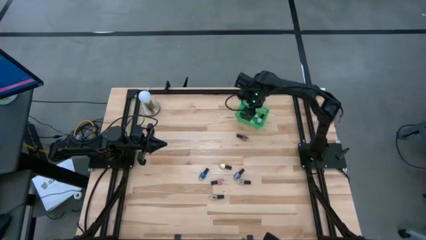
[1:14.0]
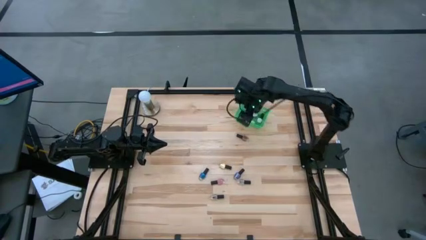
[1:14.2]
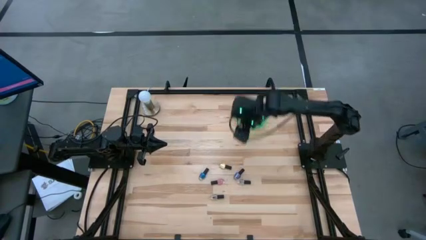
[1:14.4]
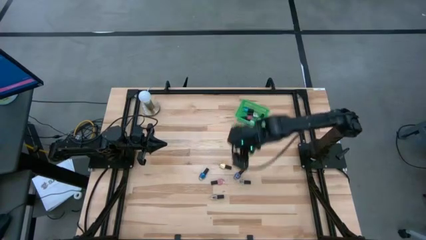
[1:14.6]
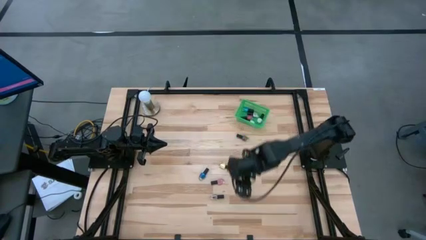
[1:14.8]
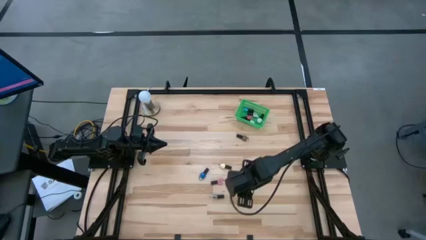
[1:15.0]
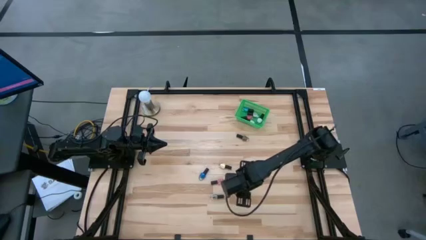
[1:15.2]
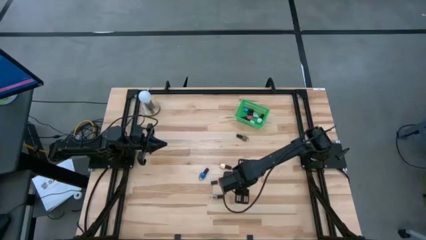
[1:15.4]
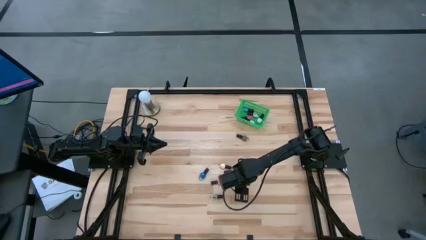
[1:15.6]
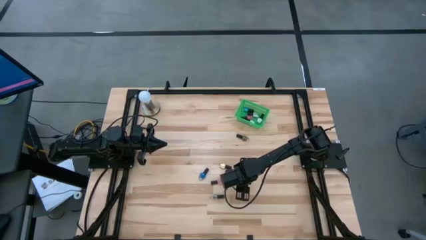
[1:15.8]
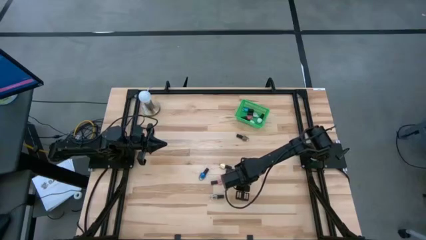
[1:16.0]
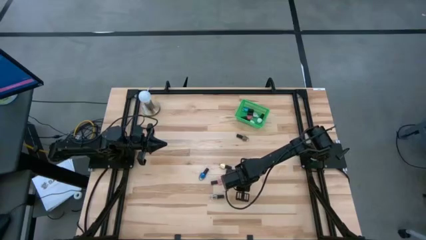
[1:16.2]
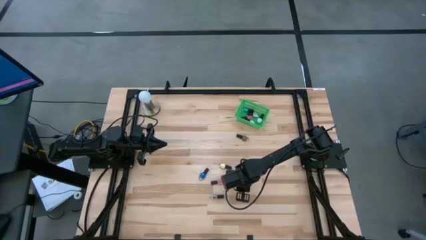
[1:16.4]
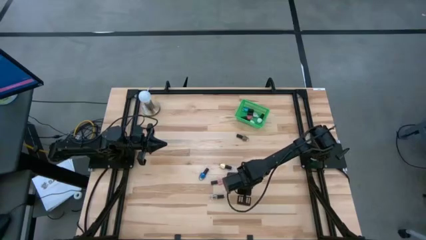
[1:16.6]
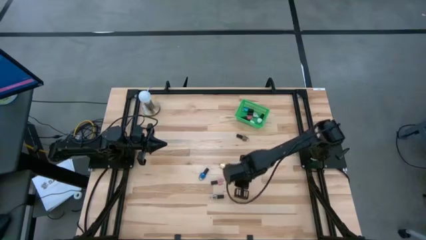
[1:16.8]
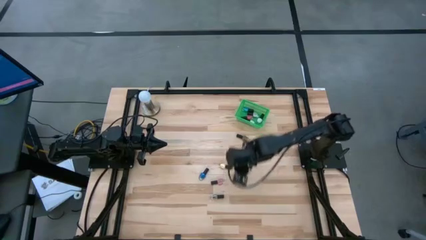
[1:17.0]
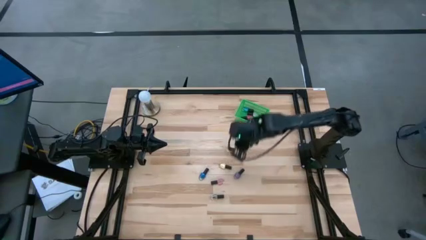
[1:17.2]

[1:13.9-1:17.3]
Task: Pick & Place Nail Polish
Put the right transparent nail polish into the green bin

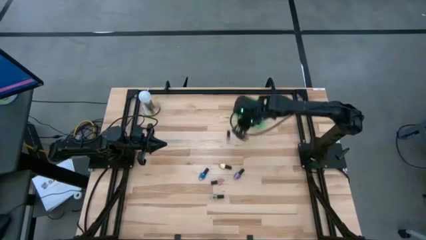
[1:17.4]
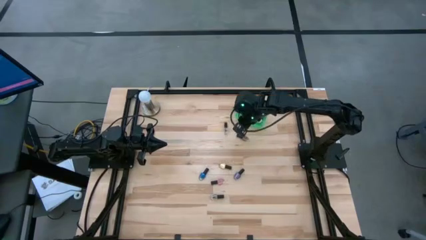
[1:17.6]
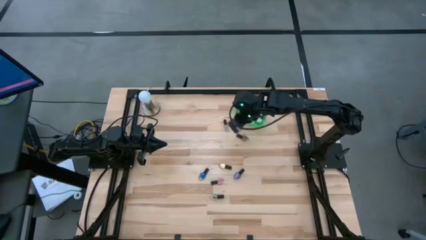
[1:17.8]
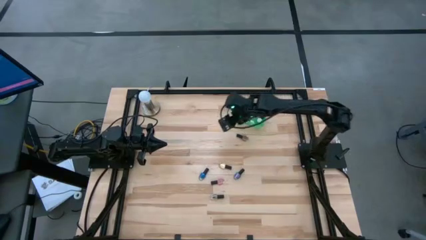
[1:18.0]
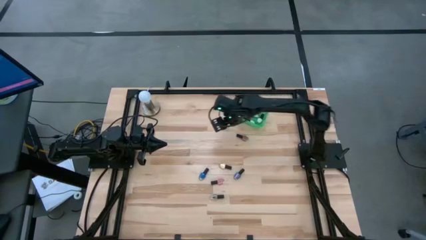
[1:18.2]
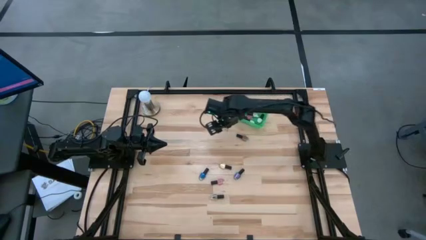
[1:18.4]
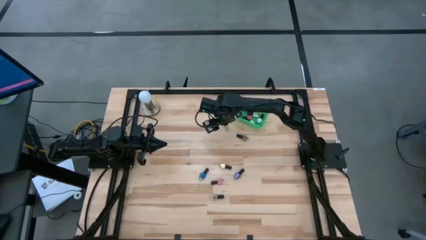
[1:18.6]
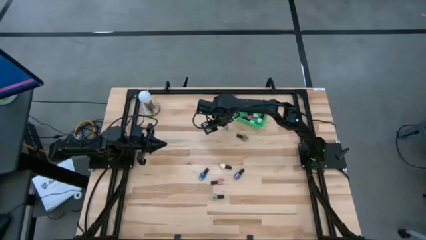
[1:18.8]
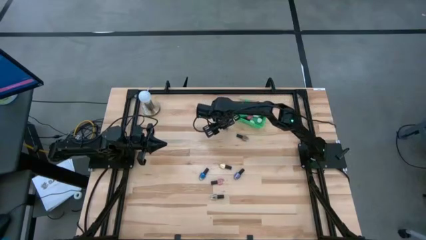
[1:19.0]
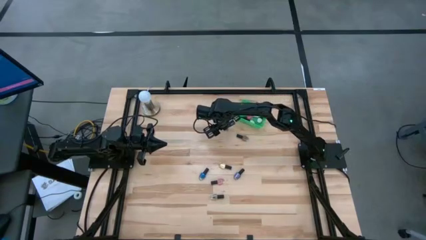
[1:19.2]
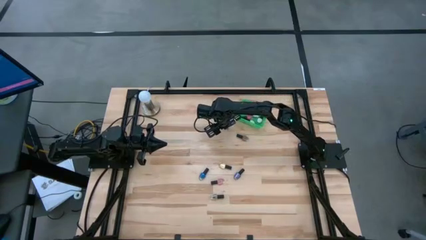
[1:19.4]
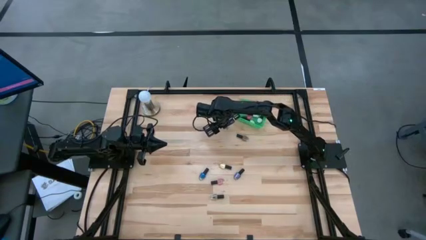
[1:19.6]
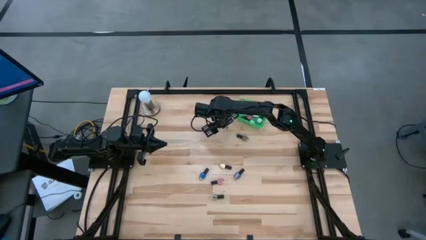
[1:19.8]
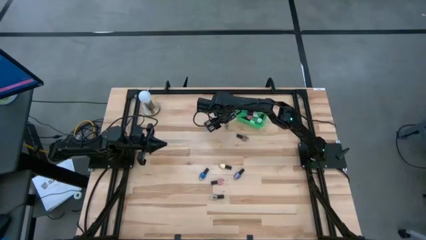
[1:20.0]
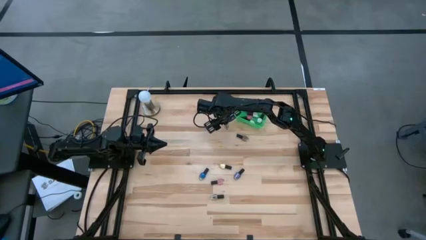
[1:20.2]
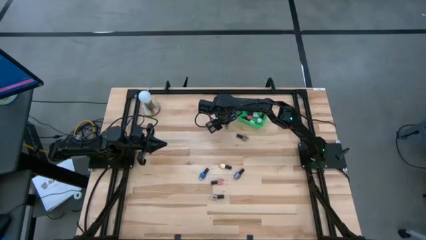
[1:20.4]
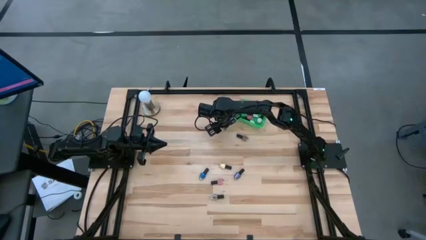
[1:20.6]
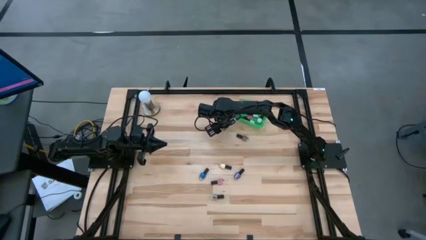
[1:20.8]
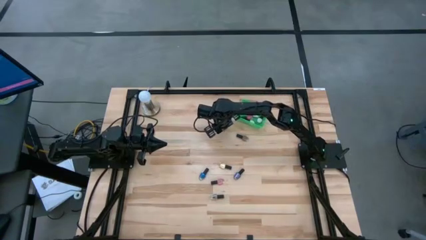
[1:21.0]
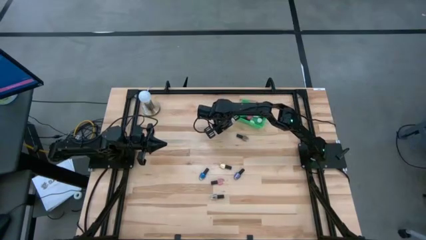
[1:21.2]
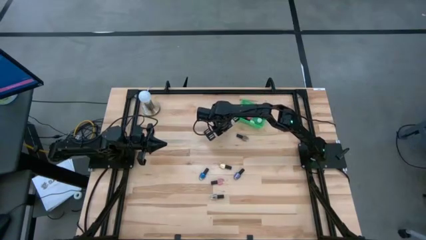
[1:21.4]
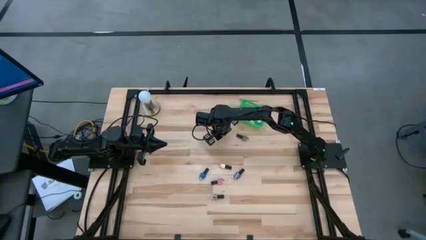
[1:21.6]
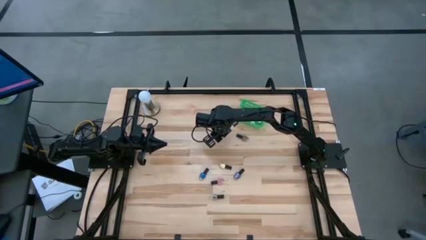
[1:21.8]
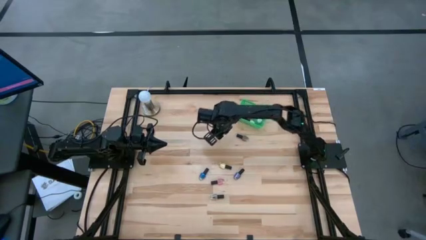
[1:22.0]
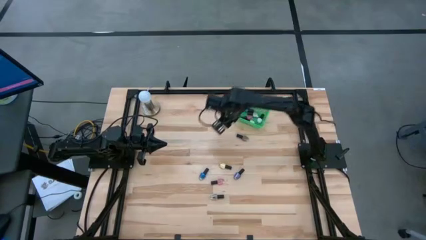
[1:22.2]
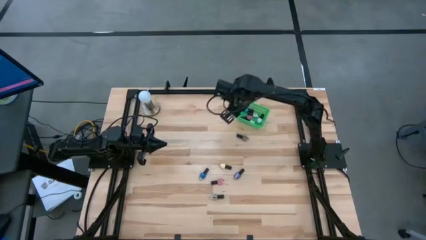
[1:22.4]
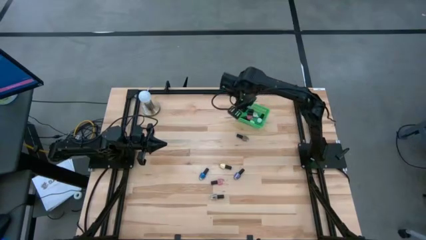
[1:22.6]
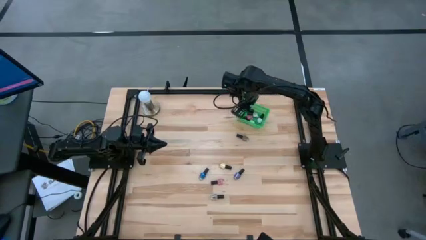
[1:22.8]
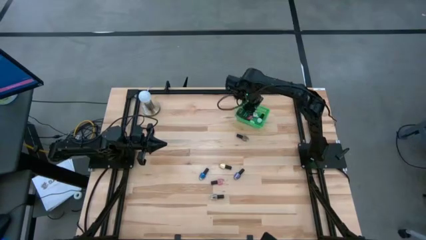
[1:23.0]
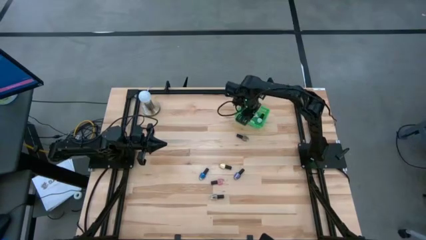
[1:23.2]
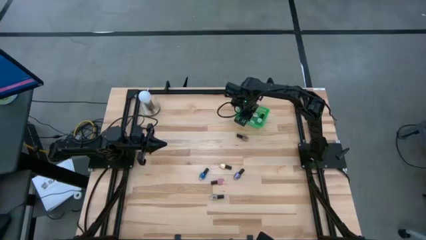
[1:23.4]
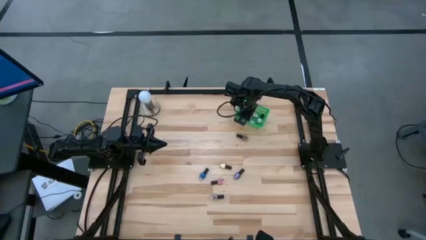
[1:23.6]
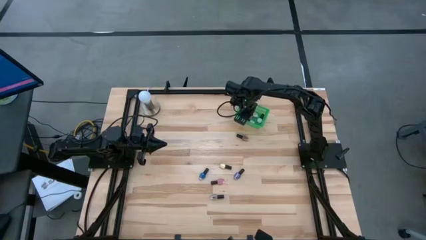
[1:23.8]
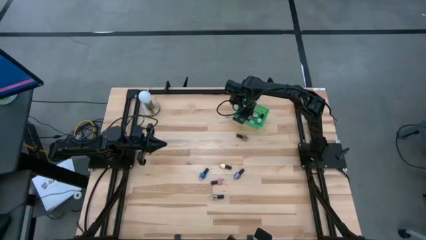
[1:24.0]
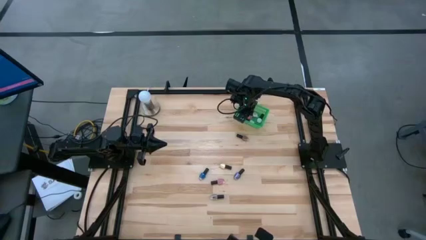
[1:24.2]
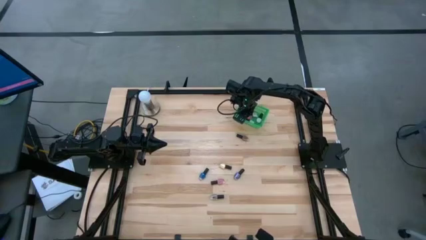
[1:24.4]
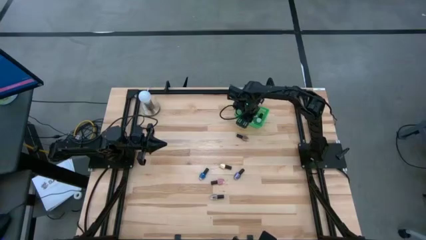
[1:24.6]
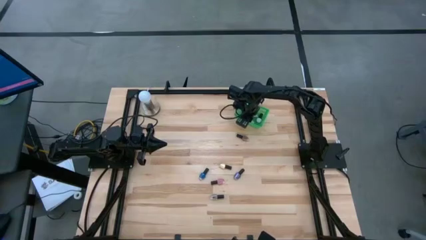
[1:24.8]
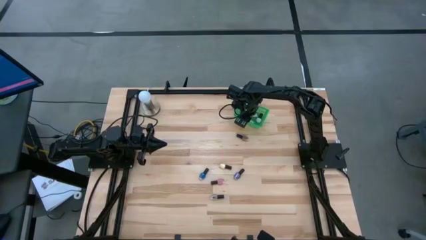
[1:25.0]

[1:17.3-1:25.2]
Put the right transparent nail polish into the green bin

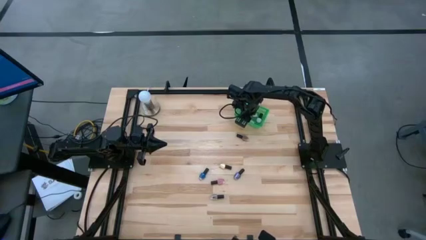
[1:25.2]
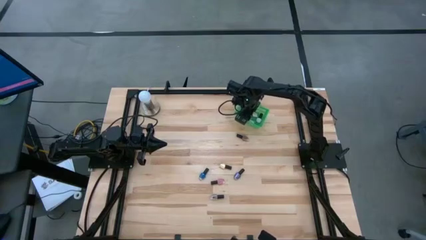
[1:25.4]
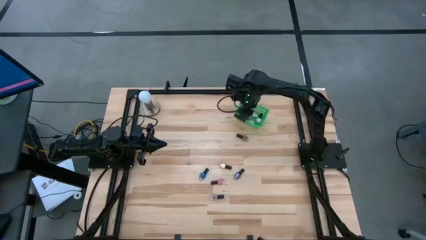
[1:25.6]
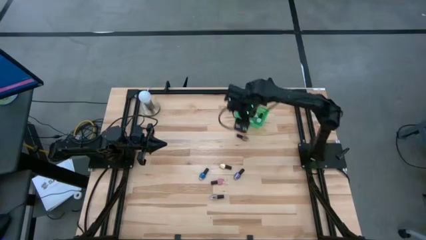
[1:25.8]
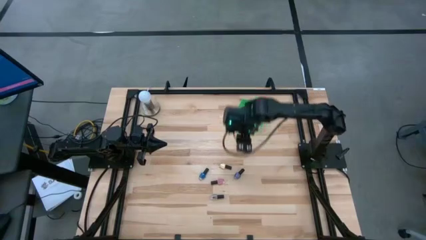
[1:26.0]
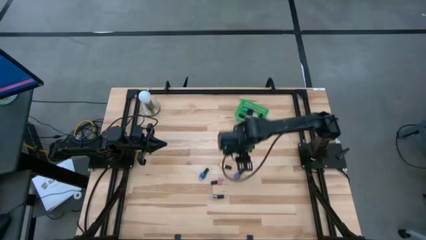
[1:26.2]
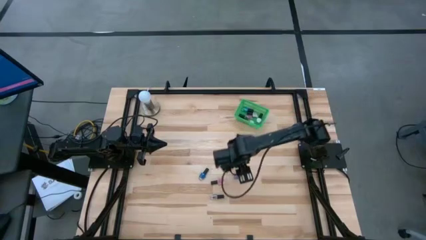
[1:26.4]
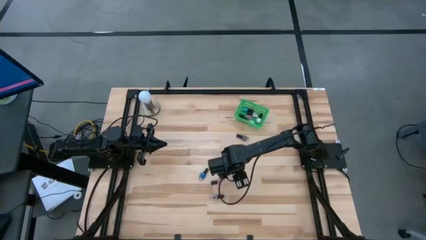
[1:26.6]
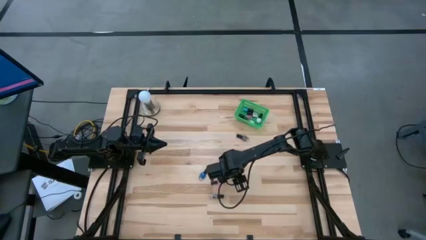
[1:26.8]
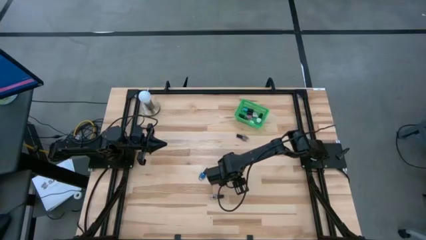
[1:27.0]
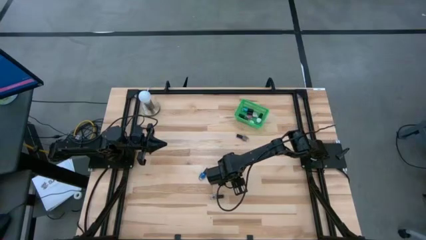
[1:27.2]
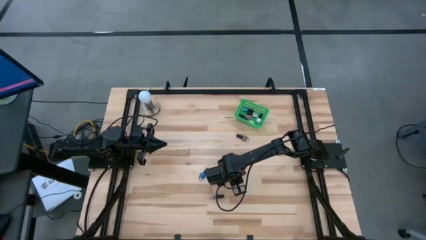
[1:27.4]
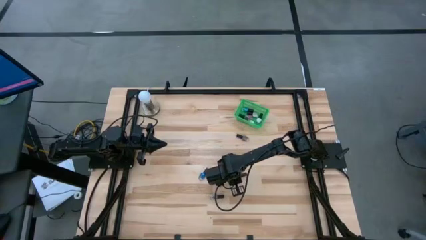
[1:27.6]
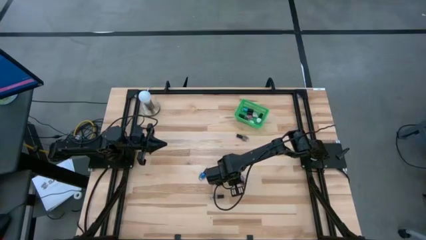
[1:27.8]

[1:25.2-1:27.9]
Put the purple nail polish into the green bin

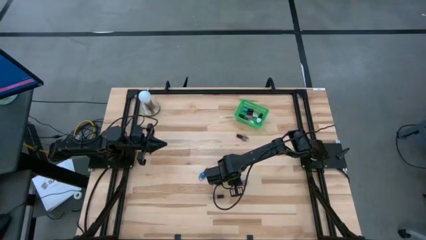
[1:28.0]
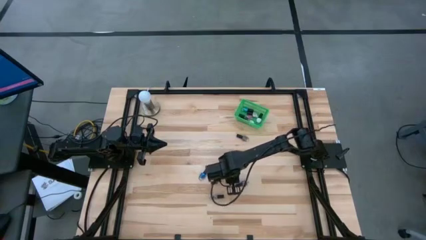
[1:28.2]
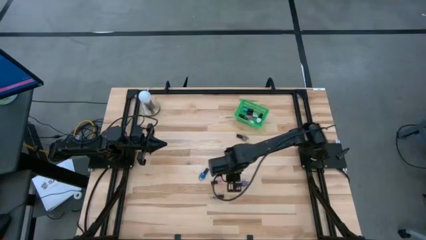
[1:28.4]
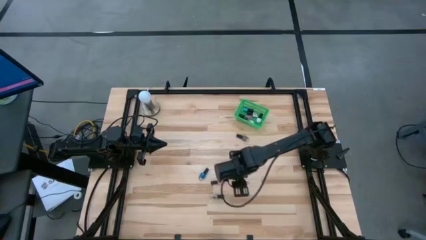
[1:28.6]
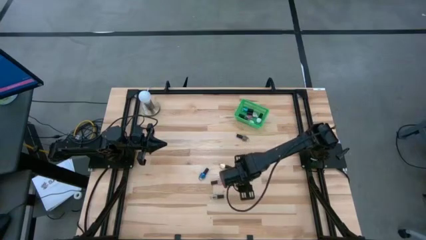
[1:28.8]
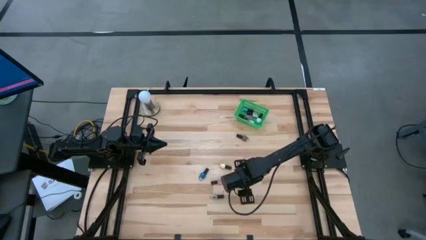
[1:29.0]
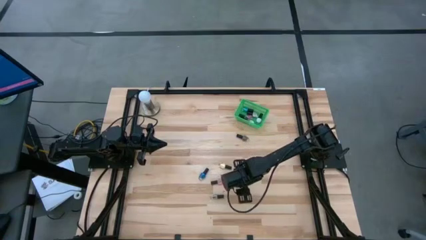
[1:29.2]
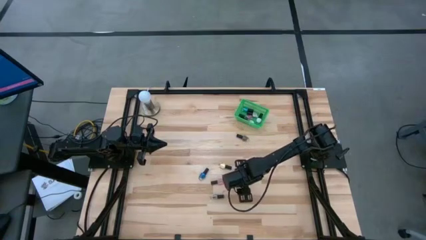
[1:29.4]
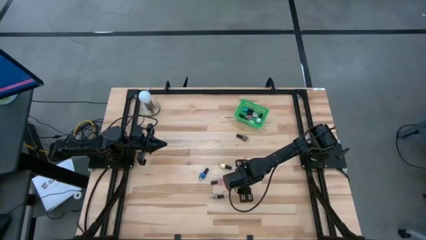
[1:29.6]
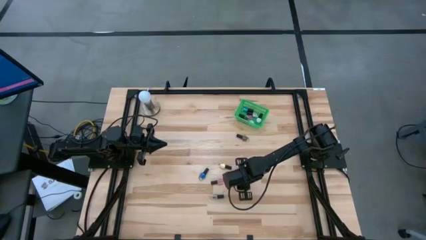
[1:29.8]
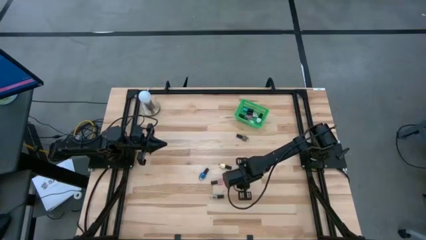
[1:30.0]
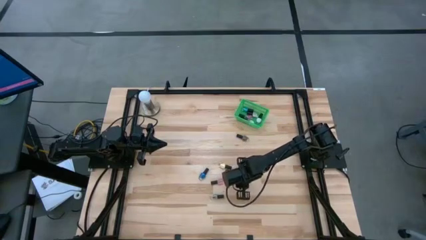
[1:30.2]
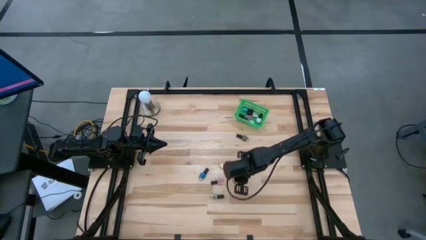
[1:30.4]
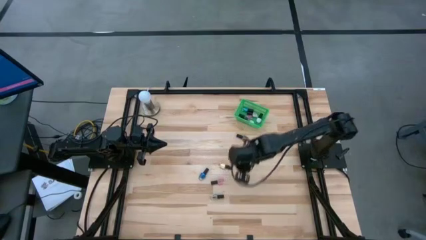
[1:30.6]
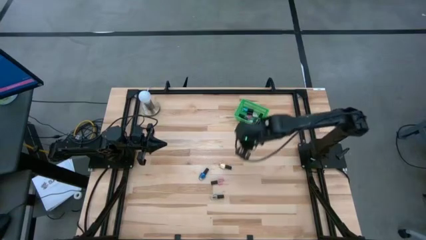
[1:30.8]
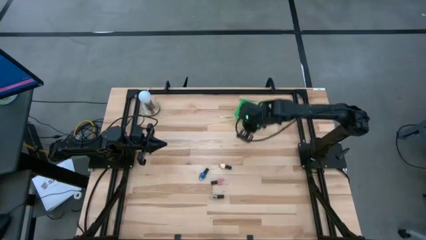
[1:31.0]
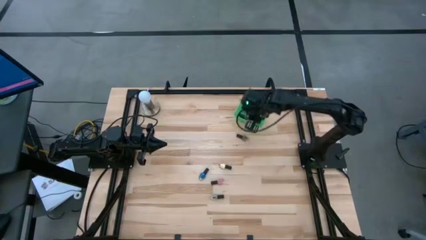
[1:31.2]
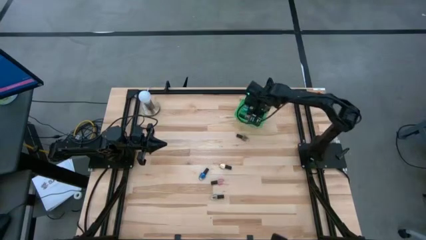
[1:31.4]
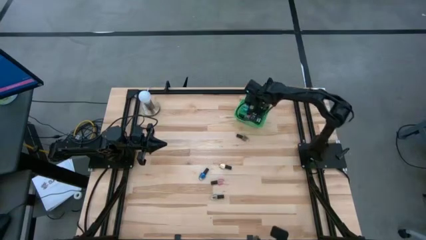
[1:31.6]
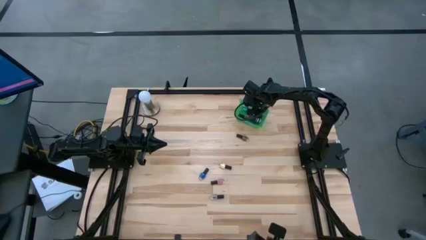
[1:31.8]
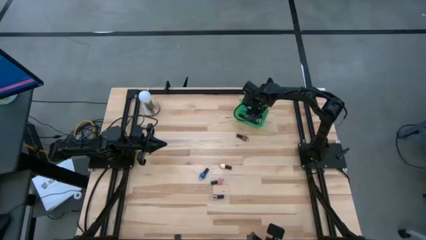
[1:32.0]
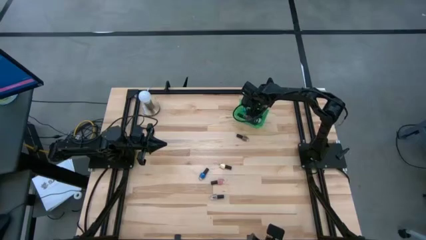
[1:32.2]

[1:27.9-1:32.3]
Put the purple nail polish into the green bin
